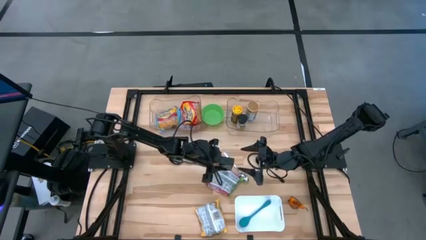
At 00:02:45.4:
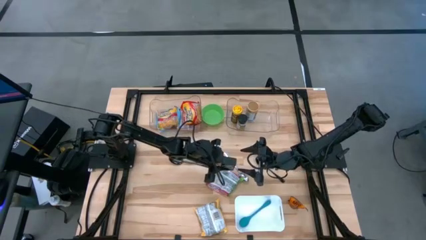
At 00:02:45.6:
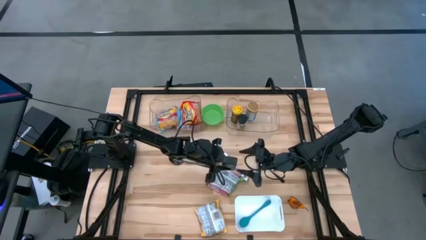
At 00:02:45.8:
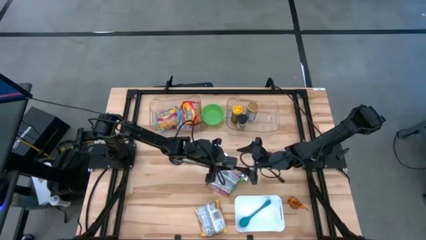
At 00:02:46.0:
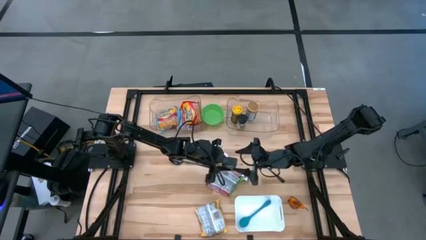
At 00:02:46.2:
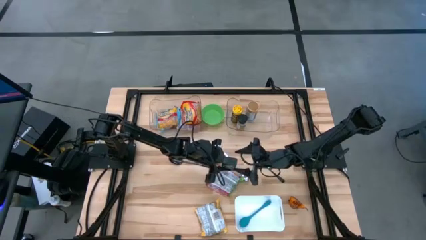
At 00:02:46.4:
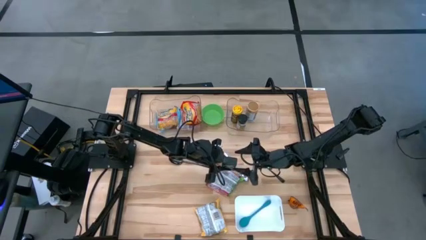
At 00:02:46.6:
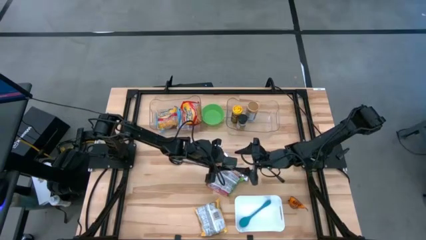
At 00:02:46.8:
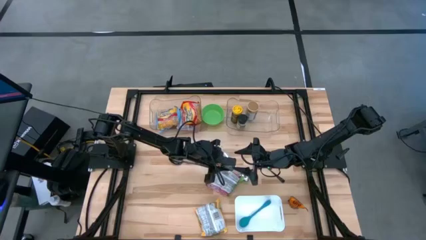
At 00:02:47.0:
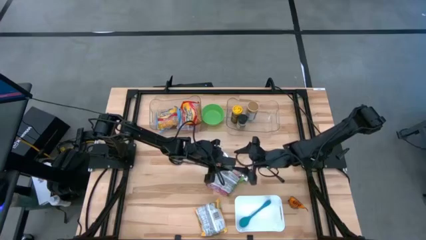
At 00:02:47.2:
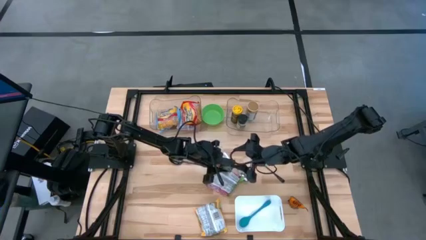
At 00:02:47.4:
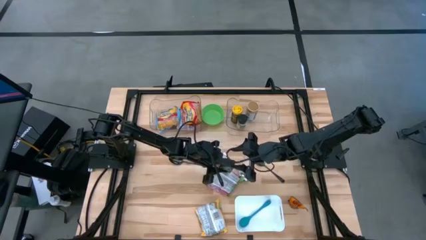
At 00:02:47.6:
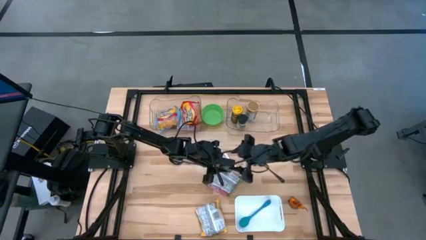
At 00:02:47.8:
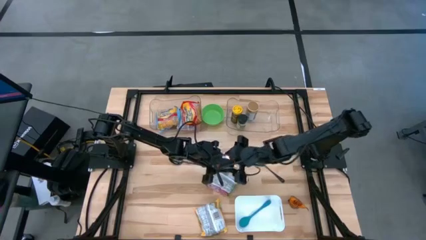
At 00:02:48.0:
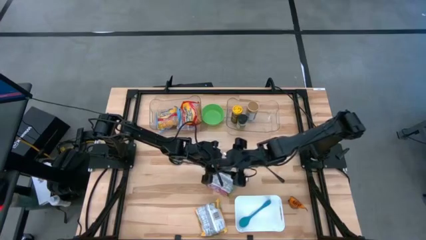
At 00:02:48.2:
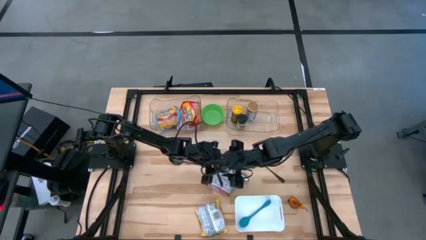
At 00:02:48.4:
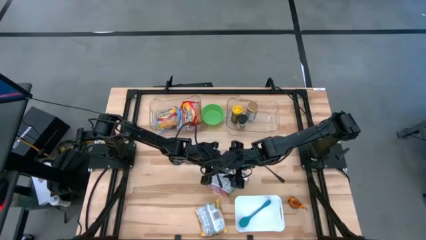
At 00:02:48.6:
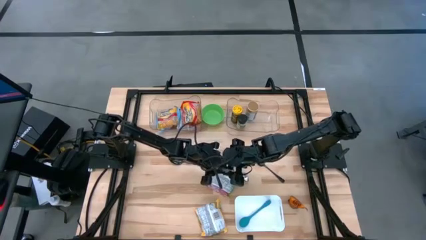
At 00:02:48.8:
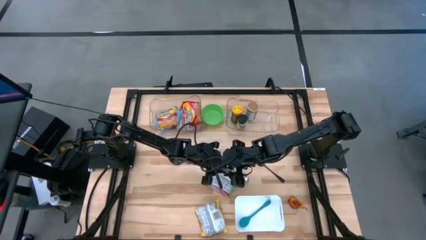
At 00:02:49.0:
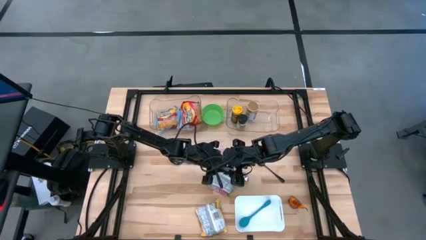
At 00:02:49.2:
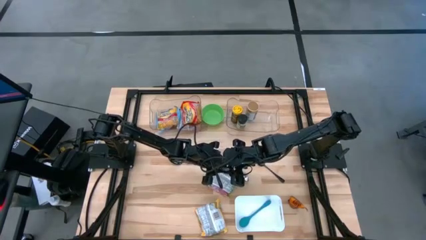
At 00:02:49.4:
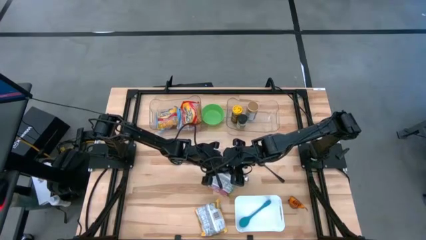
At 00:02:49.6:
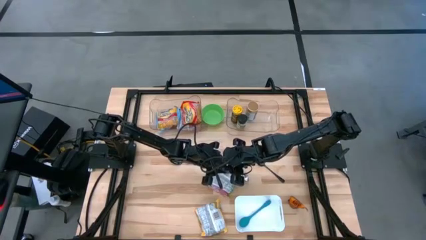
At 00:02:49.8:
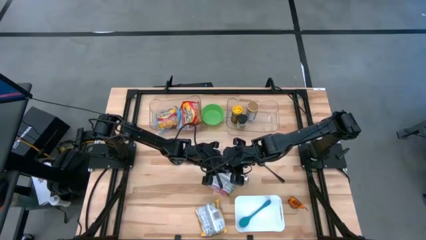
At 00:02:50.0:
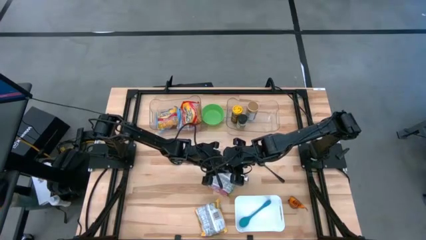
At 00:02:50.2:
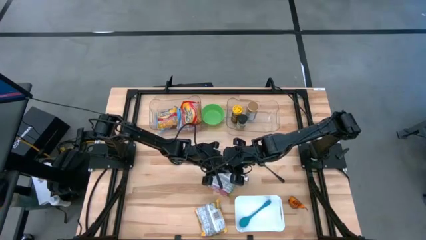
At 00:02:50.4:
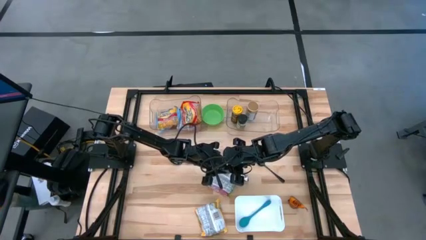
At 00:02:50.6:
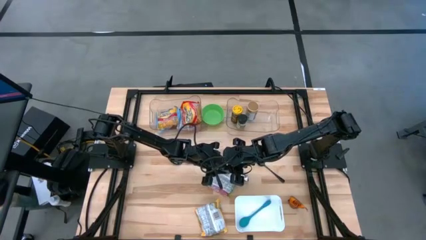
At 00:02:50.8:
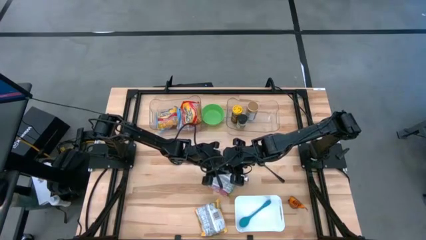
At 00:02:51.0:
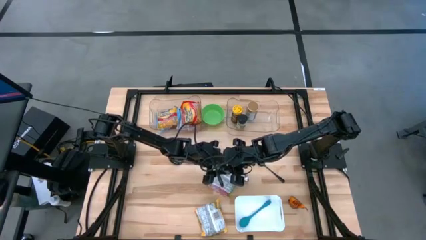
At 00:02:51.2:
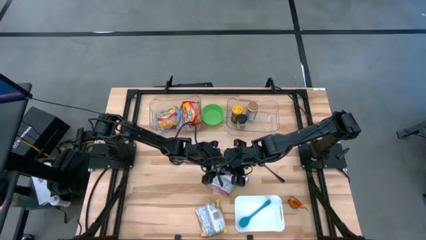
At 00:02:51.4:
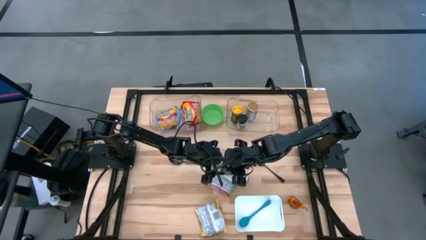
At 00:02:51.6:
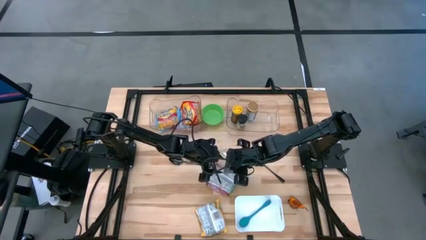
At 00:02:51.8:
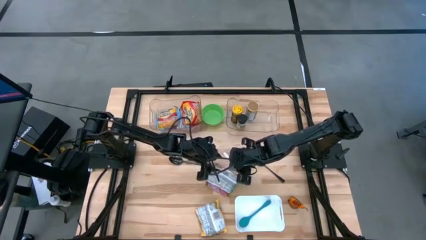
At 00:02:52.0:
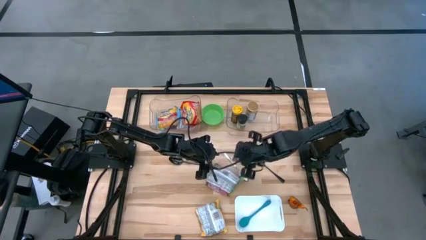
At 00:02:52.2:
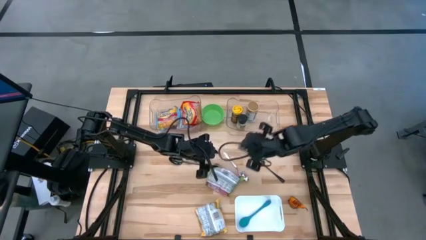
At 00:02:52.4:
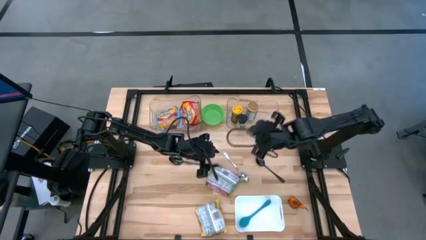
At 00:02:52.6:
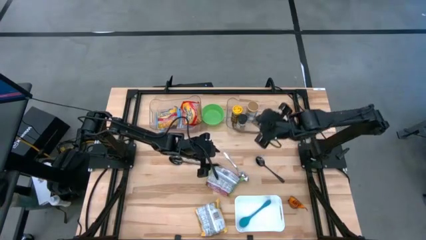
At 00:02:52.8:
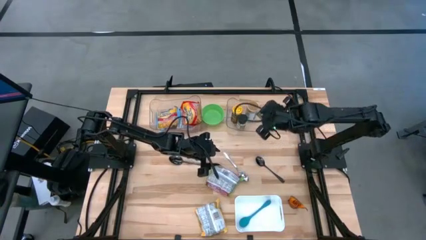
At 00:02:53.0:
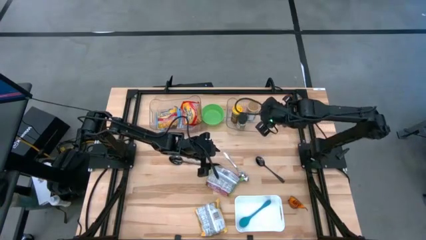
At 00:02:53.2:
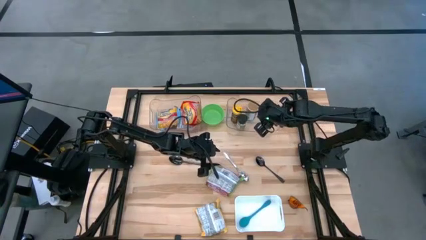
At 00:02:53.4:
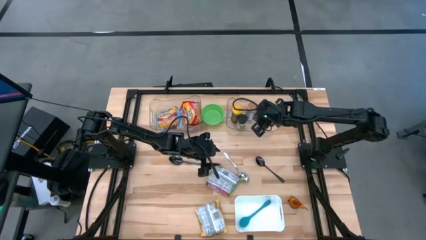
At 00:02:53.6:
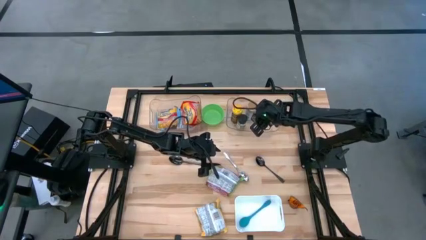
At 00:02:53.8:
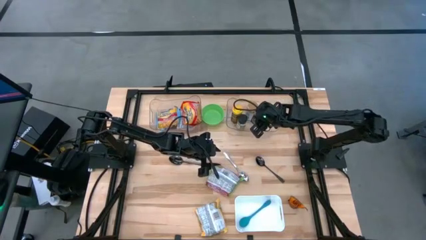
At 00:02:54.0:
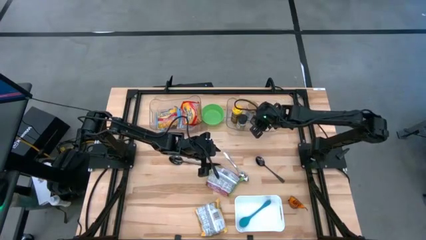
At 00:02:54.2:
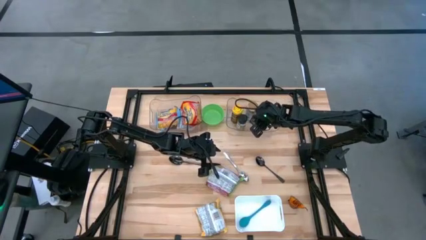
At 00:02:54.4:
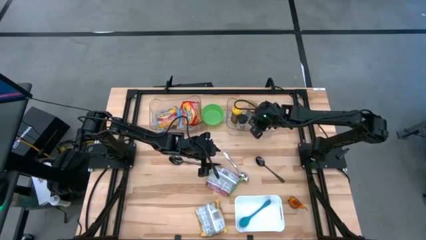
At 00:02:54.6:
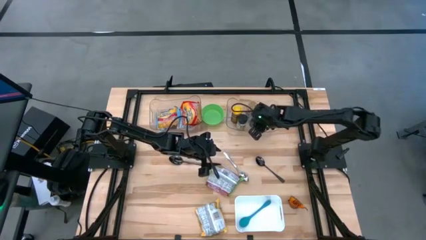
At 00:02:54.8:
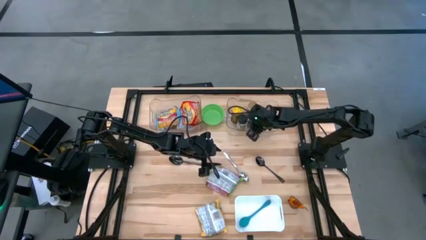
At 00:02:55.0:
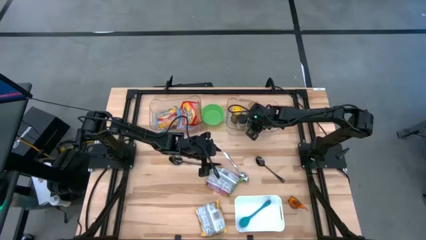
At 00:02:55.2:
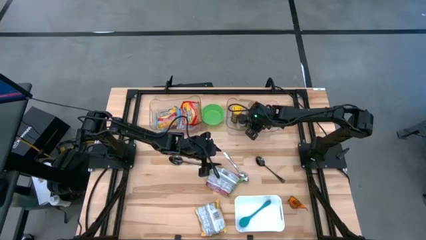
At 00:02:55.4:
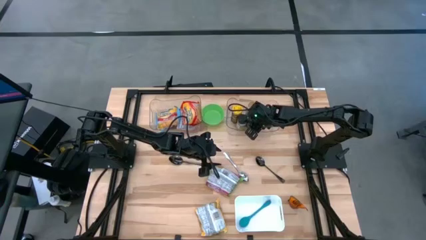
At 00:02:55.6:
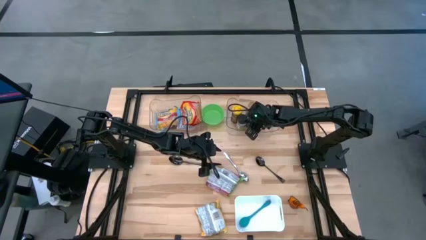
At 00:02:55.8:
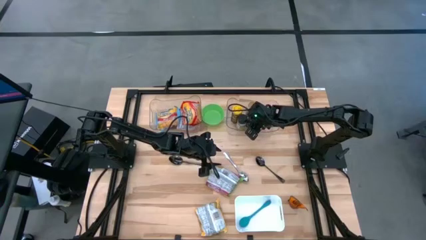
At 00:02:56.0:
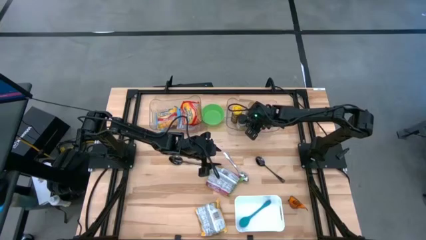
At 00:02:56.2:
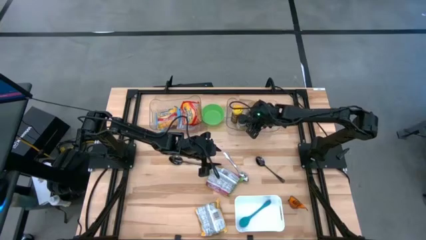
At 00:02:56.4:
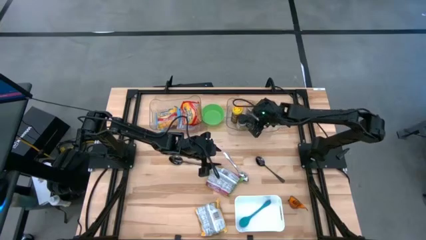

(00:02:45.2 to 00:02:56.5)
Task: Pick & Place Food Item
Put the black spice can in the right transparent bin
